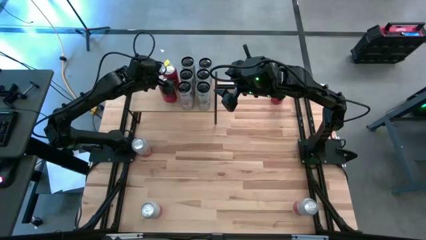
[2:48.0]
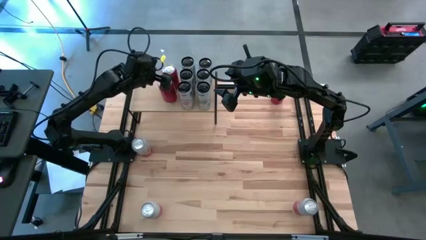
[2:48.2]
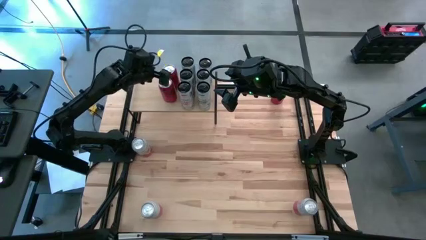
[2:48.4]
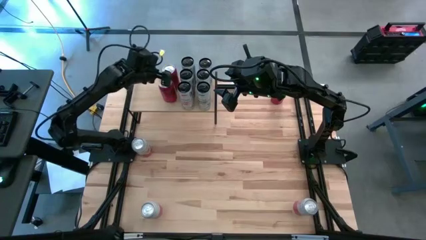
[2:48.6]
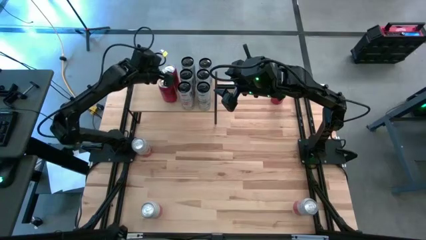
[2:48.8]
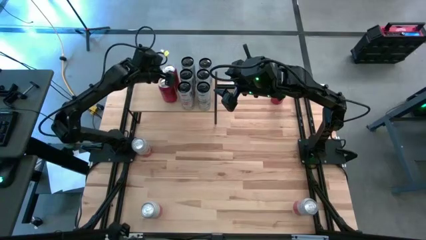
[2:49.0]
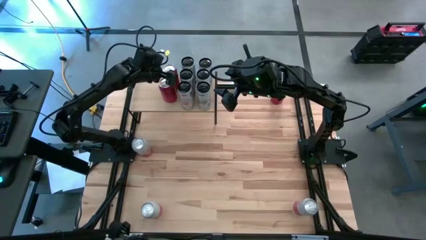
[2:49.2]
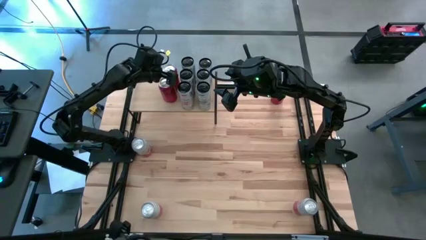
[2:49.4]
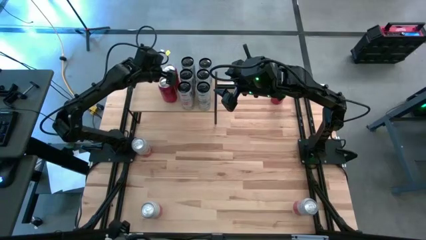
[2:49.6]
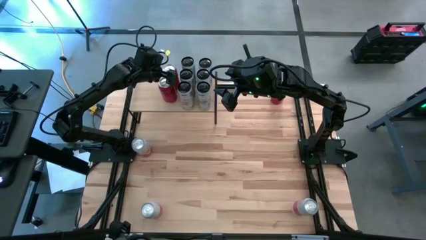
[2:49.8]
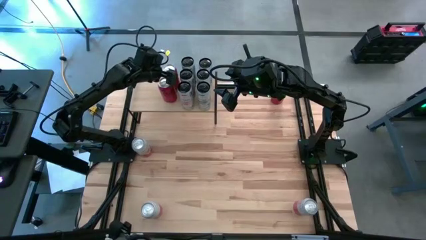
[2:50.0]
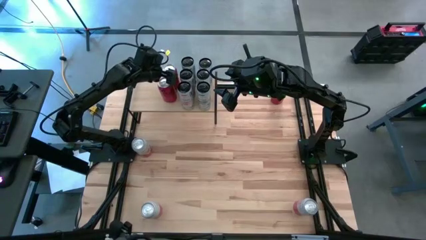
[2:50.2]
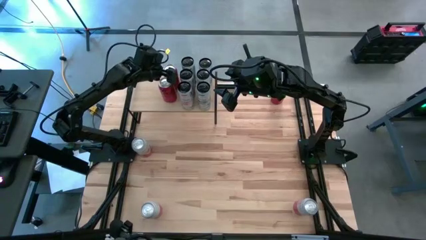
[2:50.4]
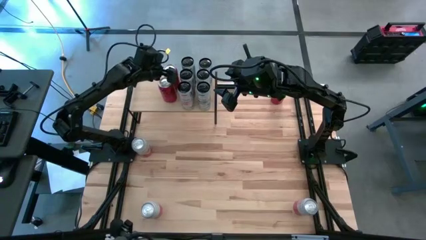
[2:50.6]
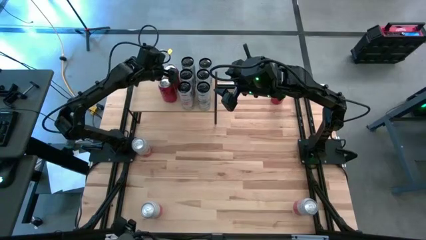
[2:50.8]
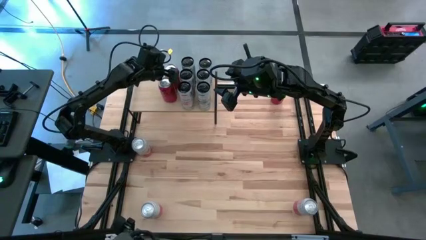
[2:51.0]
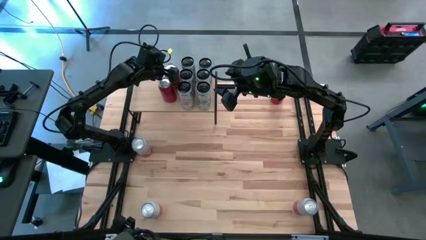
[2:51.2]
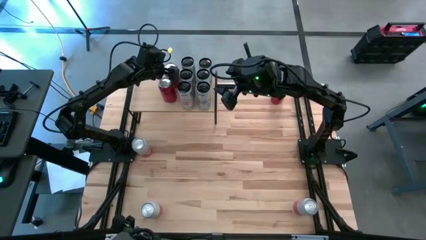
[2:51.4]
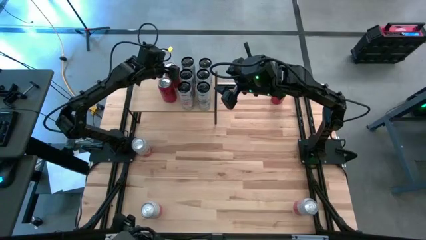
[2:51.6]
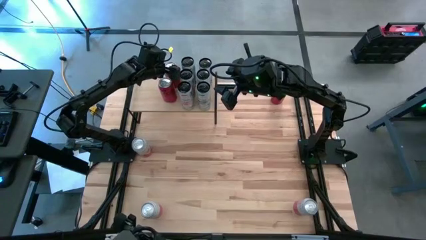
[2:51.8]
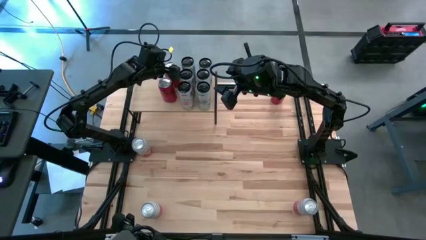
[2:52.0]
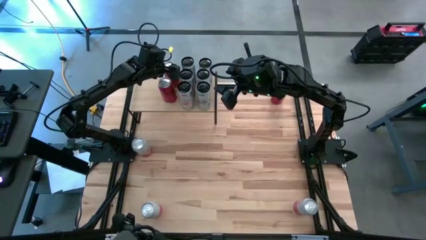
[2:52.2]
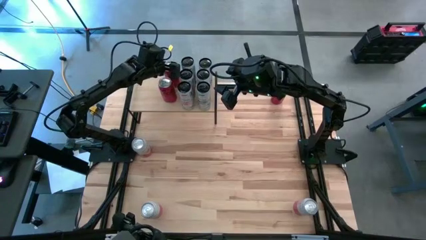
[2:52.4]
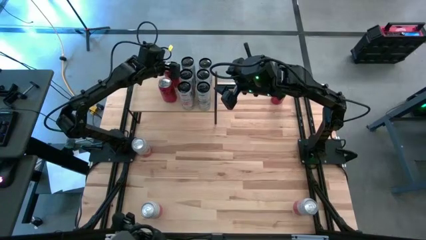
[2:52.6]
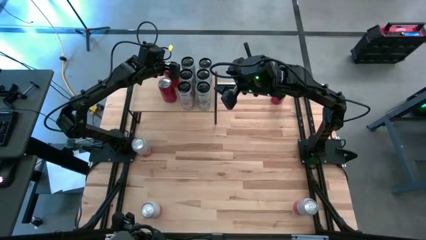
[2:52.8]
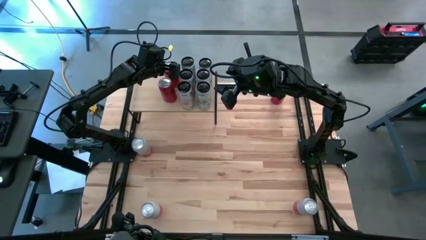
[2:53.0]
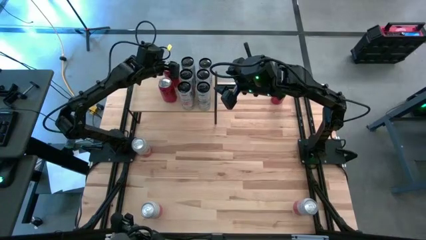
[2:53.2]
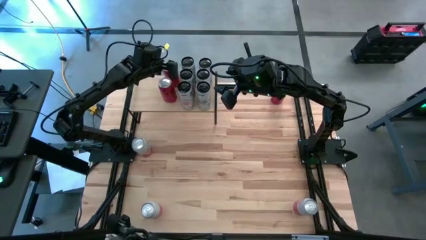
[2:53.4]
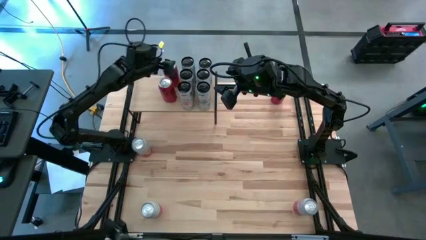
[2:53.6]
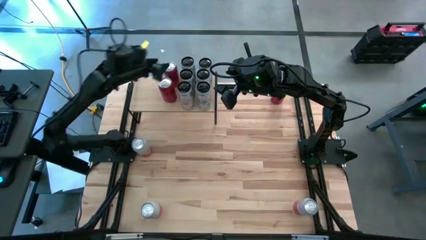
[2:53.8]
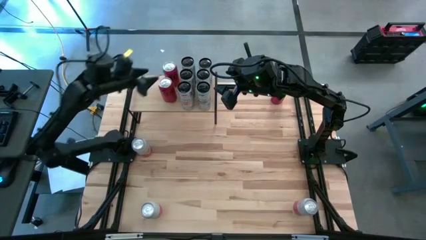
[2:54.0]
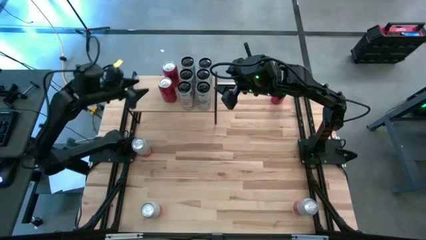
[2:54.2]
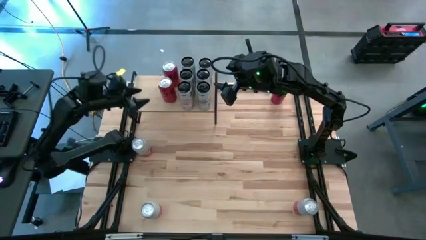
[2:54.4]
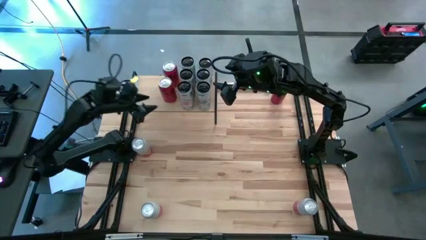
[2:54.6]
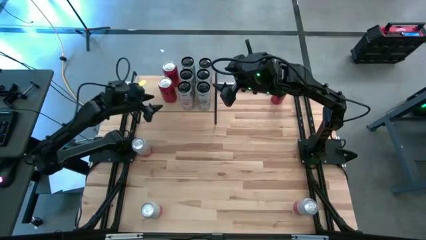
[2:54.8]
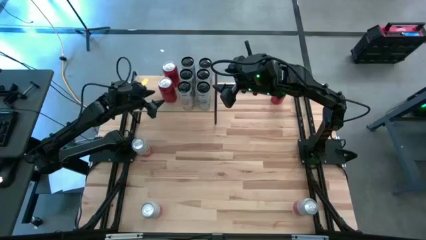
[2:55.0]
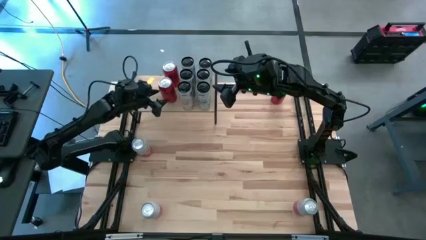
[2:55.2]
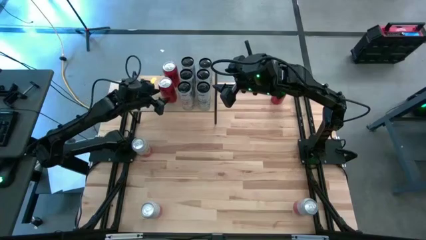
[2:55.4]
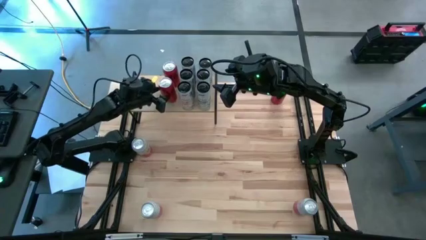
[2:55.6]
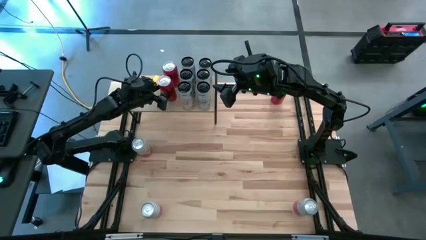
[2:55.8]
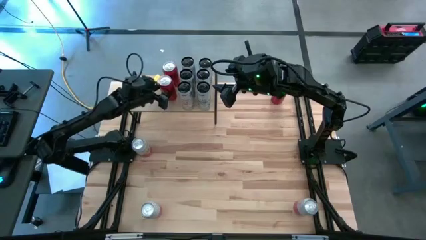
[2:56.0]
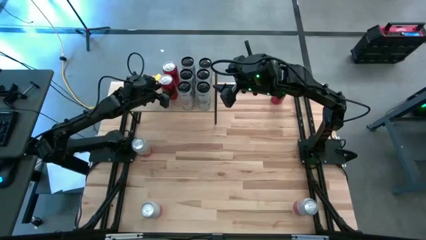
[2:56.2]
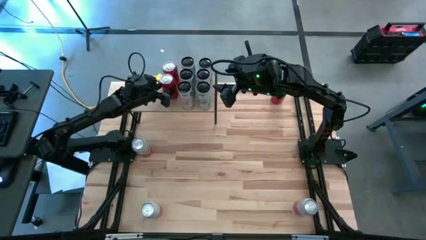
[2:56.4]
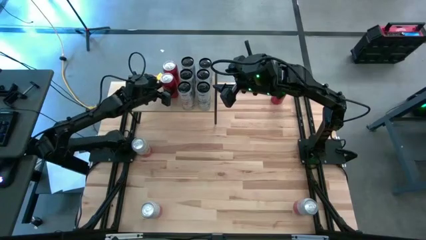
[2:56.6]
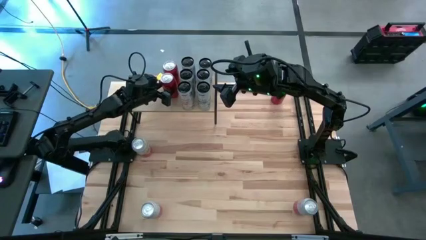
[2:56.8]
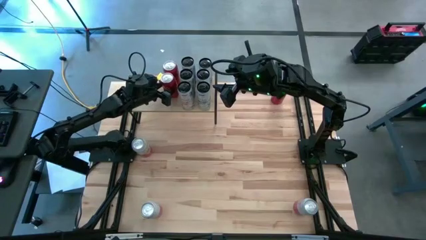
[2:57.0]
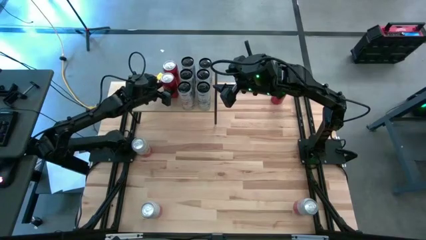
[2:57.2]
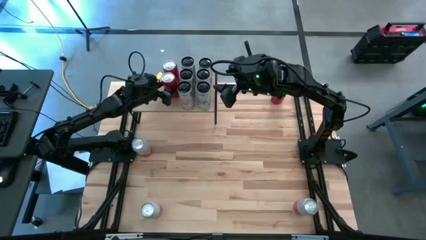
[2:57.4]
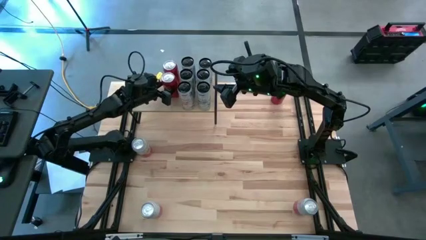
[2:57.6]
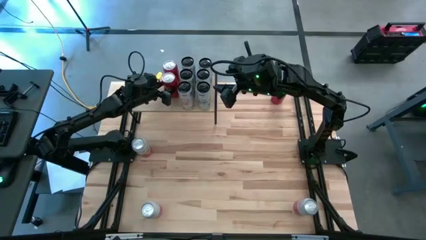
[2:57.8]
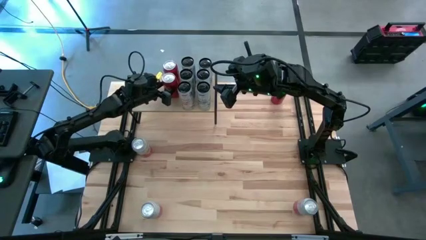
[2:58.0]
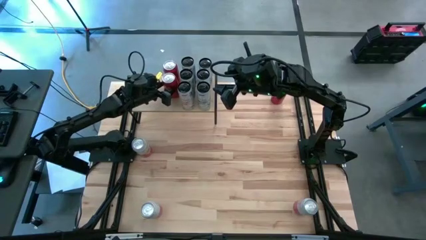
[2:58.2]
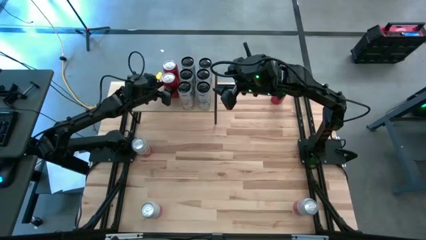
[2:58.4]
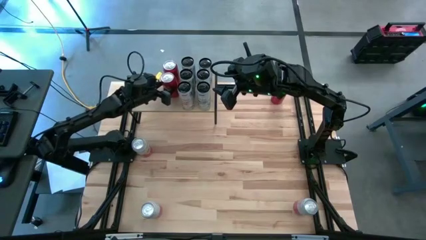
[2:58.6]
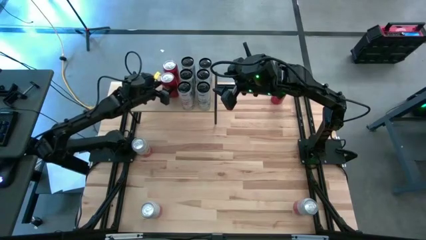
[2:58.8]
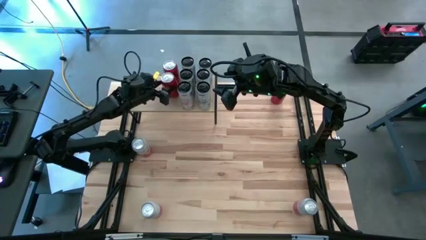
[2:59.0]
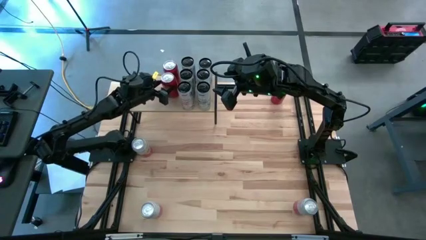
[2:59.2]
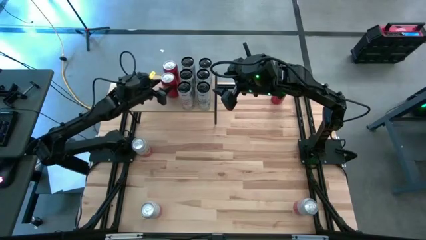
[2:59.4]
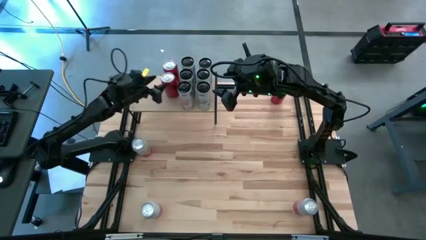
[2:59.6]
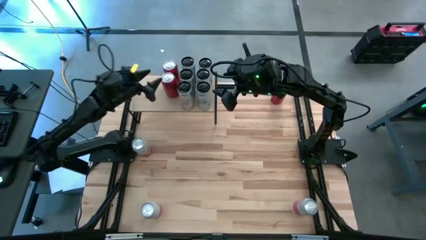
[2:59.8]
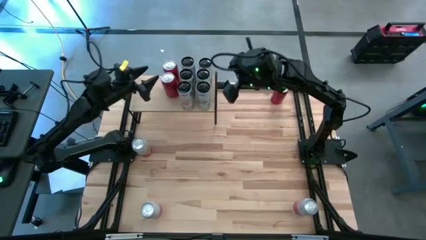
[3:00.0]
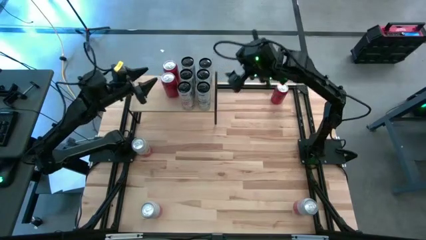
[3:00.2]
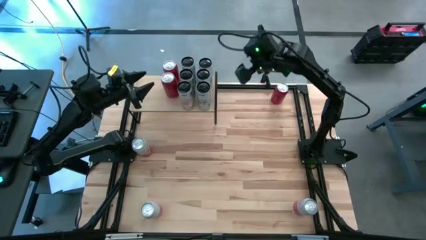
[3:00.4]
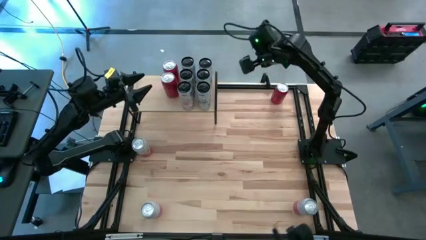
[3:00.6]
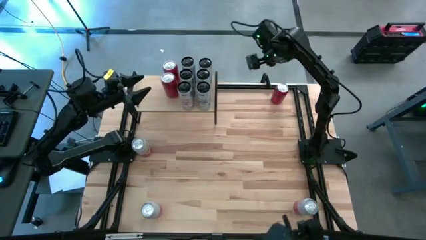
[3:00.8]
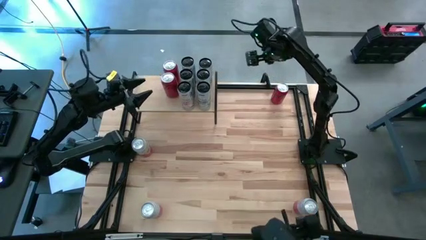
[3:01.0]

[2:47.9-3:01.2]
Task: Place canned beverage on shelf
Adjust the aligned red soda cans on the shelf

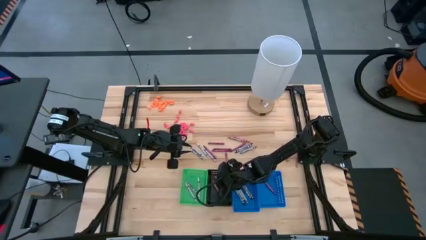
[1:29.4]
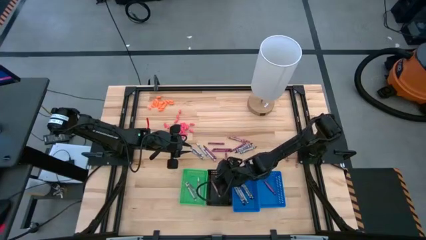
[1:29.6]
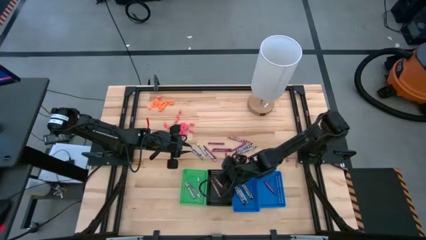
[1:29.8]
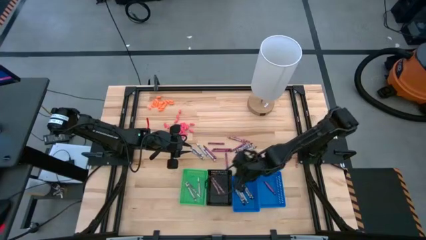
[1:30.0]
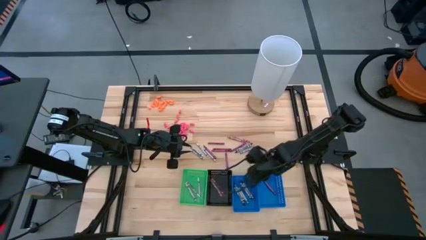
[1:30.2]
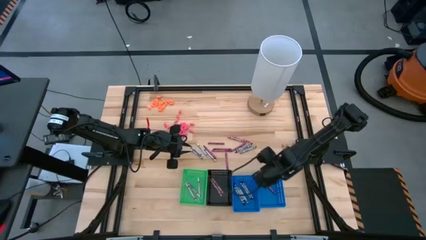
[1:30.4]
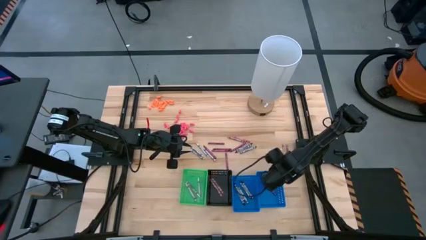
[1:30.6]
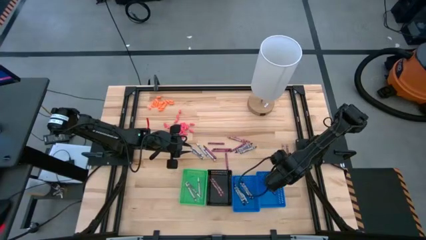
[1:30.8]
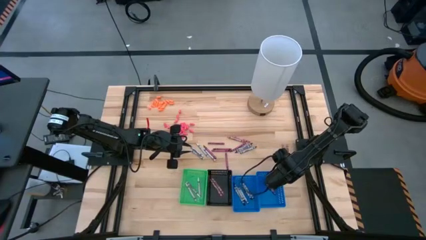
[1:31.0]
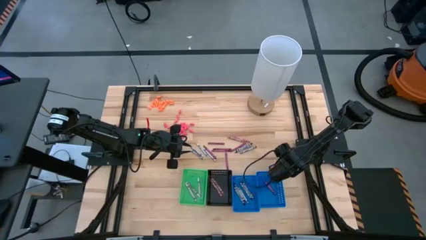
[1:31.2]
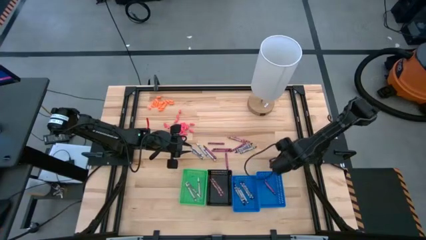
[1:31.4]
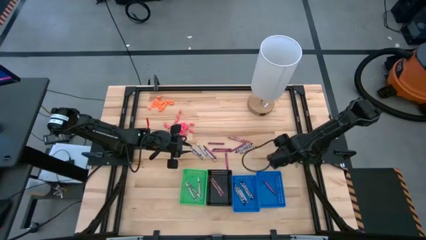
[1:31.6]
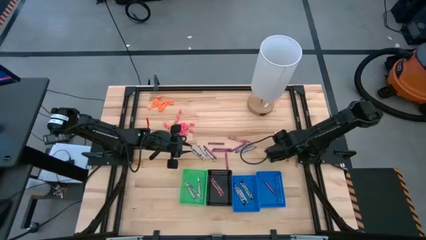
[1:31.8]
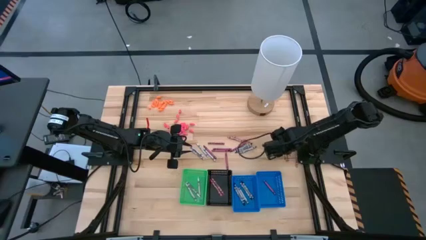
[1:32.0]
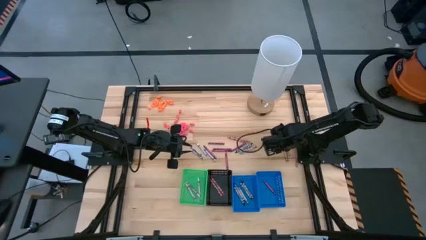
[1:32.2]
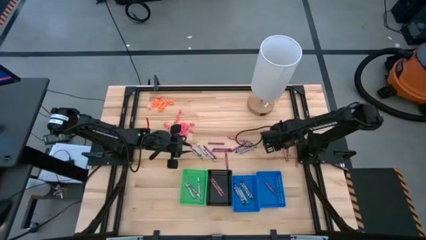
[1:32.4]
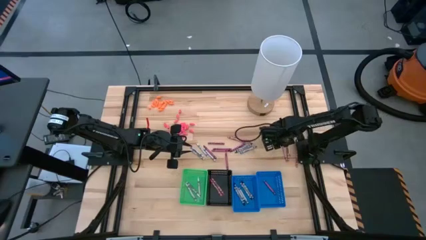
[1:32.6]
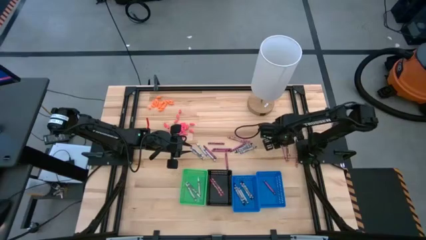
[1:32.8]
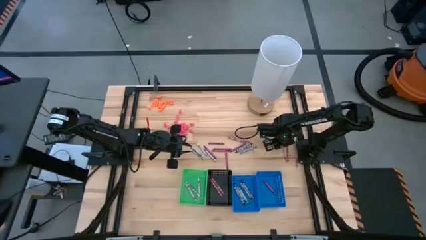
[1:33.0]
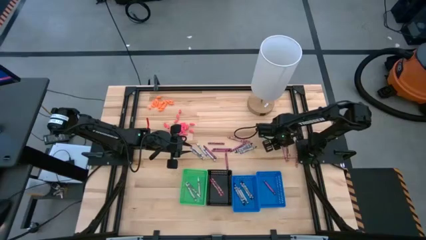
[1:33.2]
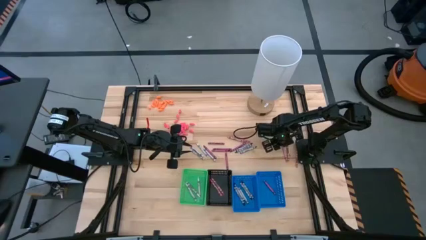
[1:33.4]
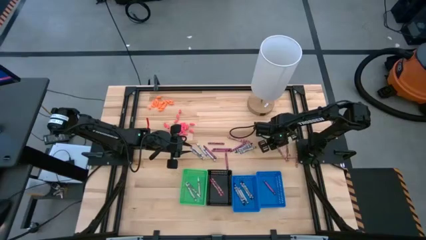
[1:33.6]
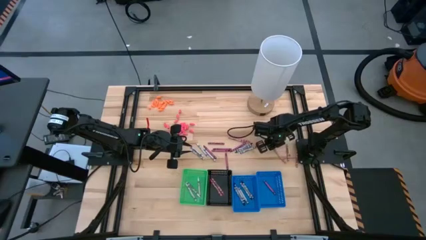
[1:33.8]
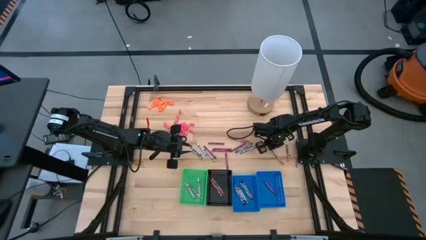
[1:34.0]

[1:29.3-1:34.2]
Task: Sort crayons
Put the pink crayon into the black bin
